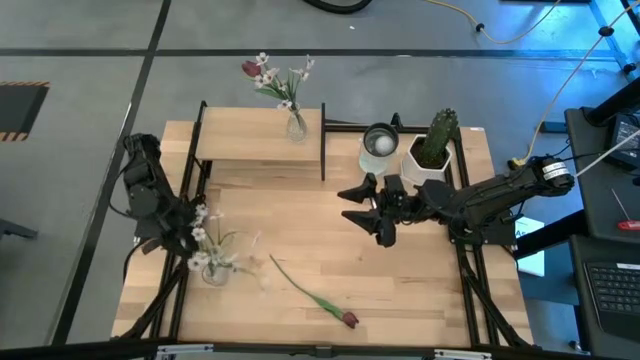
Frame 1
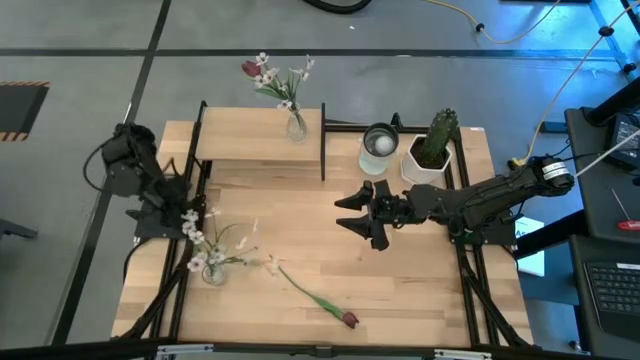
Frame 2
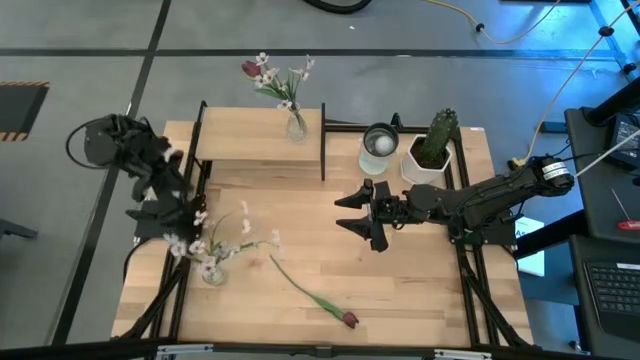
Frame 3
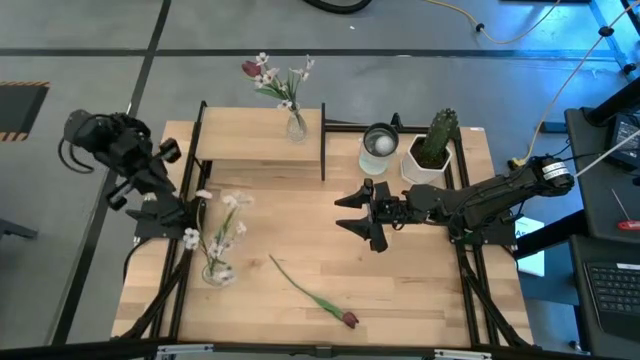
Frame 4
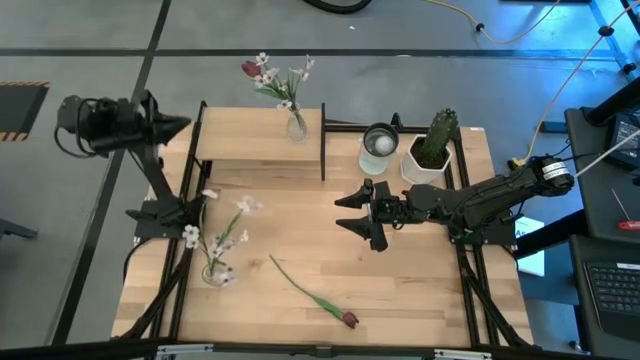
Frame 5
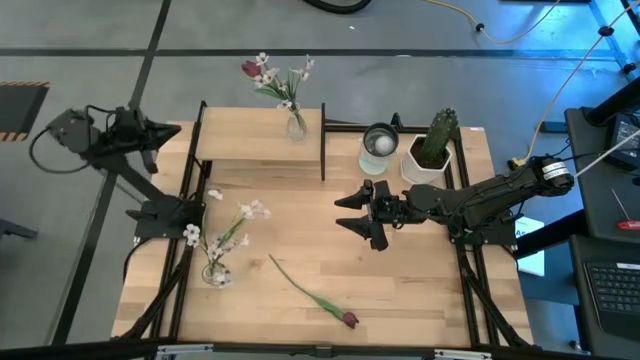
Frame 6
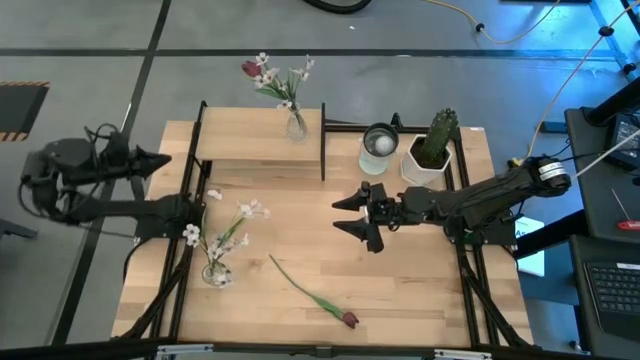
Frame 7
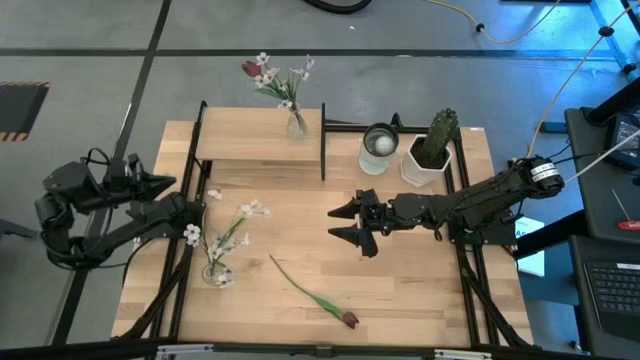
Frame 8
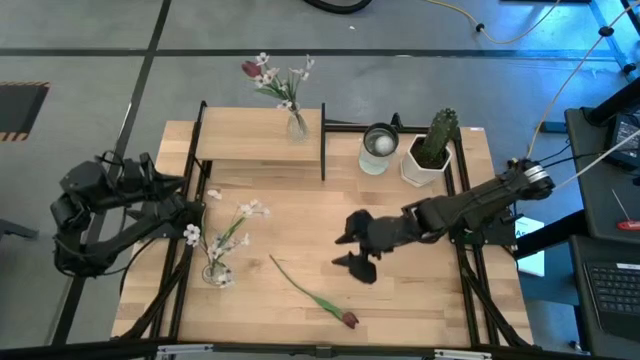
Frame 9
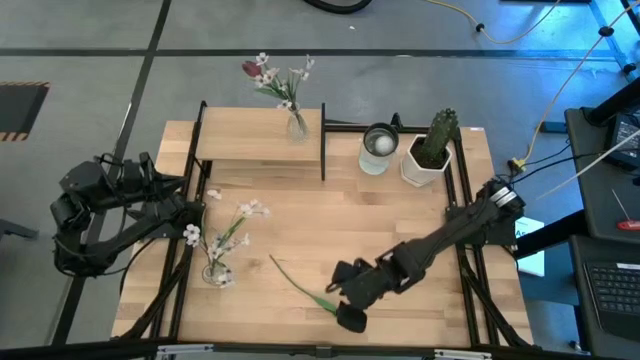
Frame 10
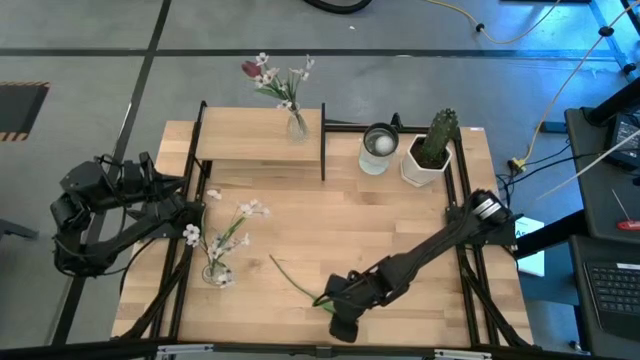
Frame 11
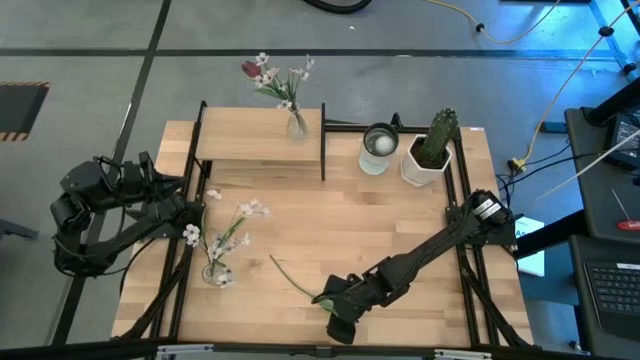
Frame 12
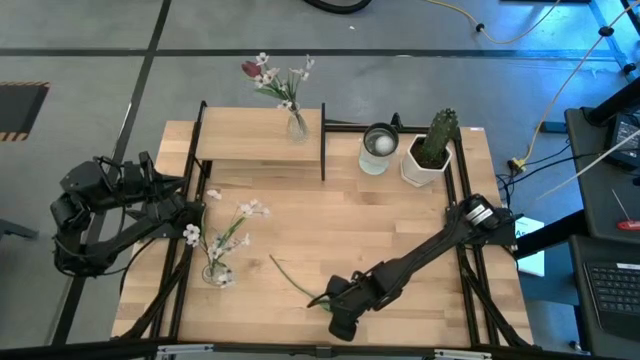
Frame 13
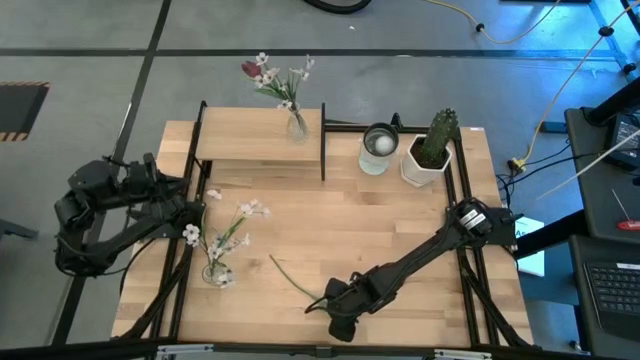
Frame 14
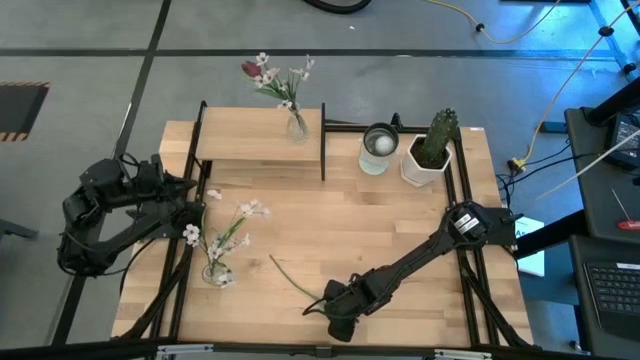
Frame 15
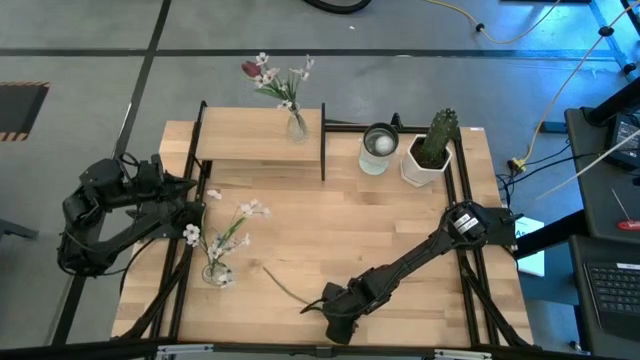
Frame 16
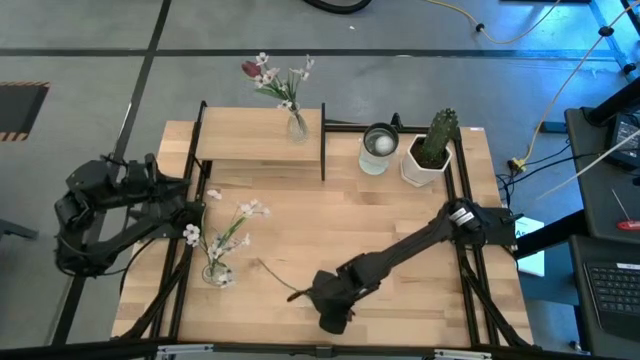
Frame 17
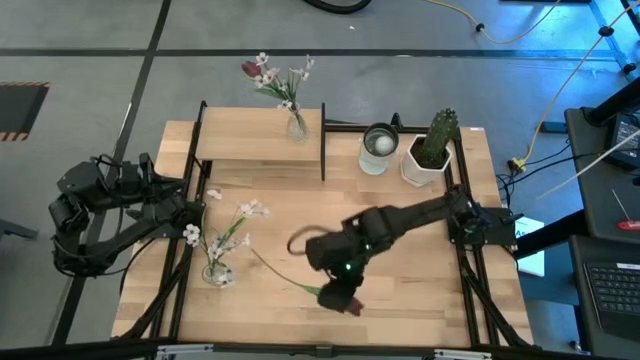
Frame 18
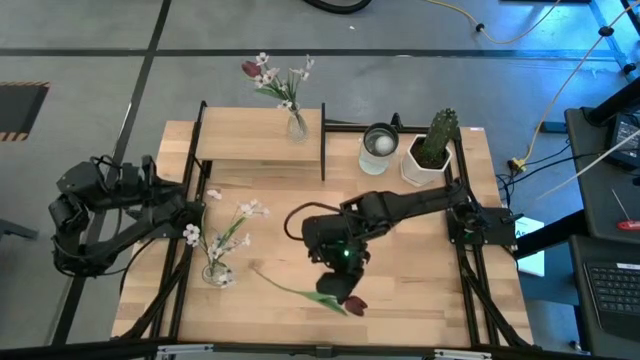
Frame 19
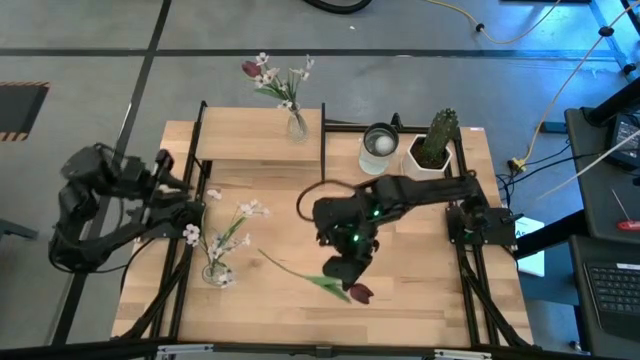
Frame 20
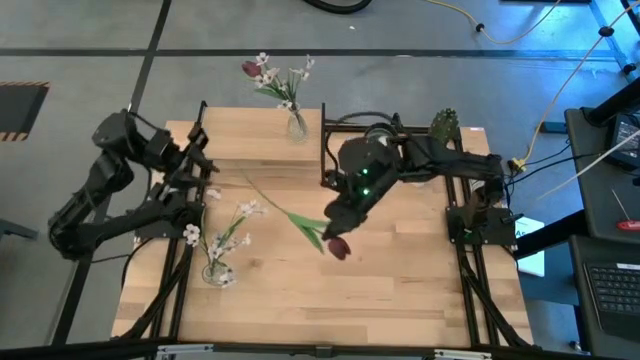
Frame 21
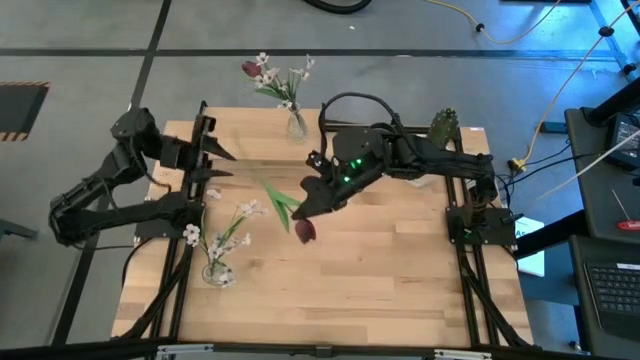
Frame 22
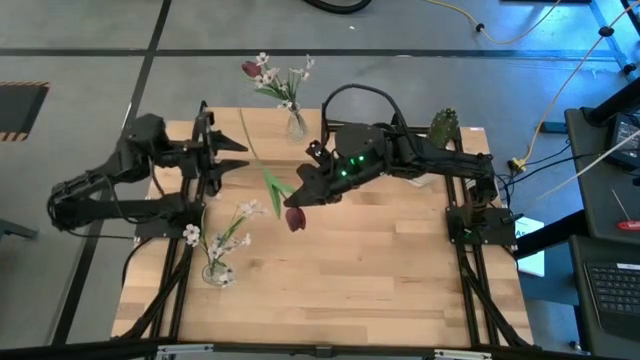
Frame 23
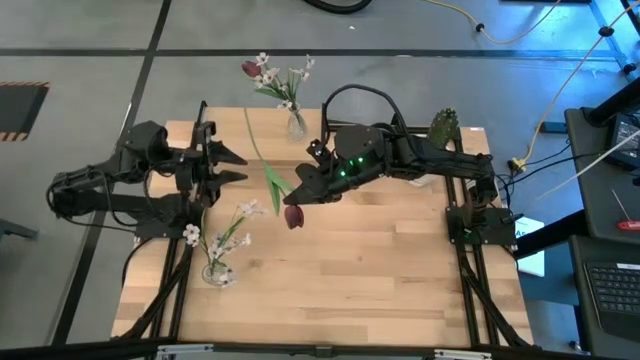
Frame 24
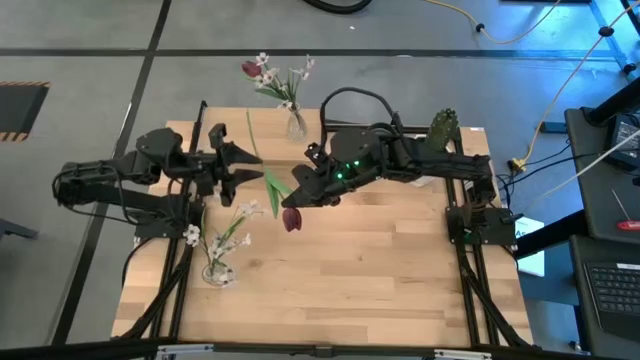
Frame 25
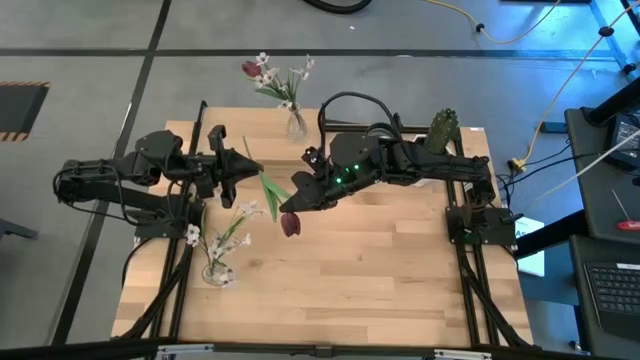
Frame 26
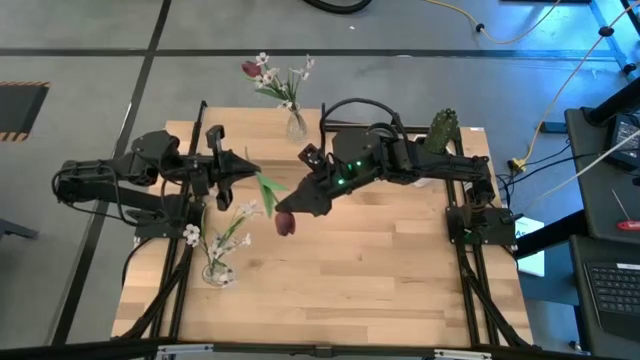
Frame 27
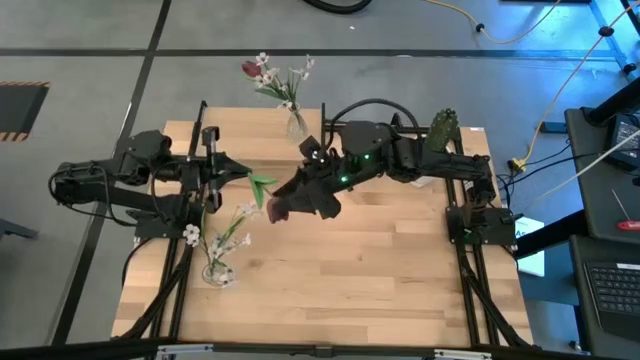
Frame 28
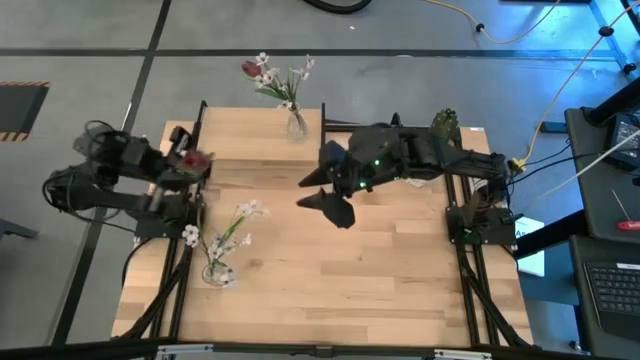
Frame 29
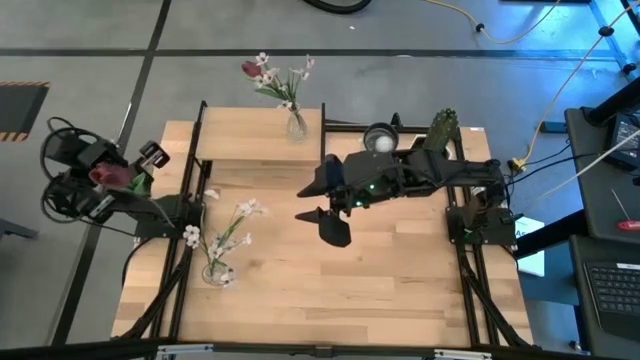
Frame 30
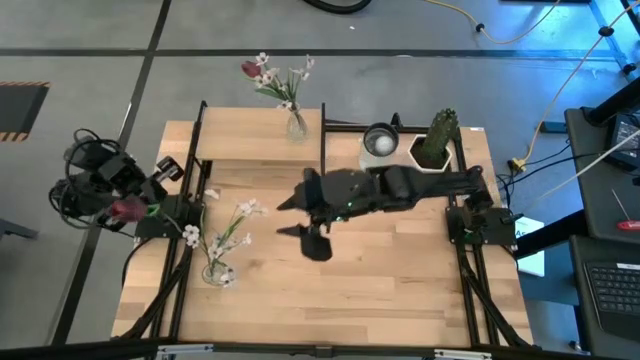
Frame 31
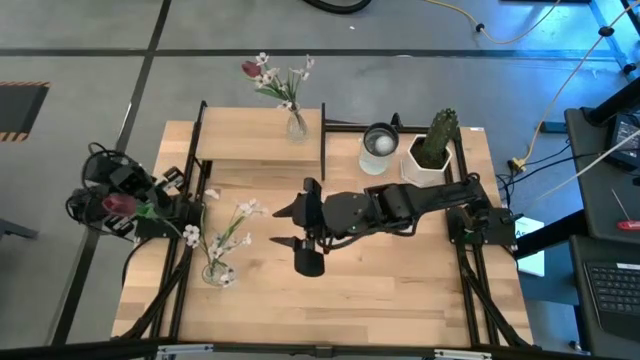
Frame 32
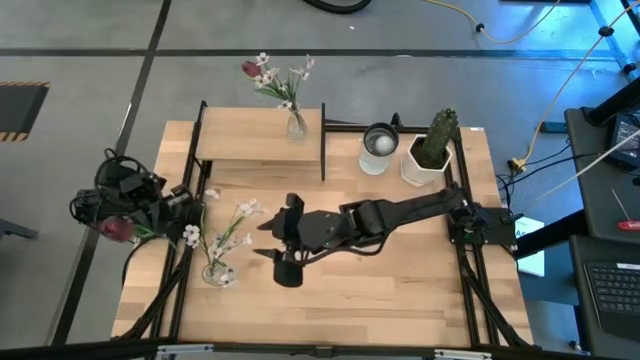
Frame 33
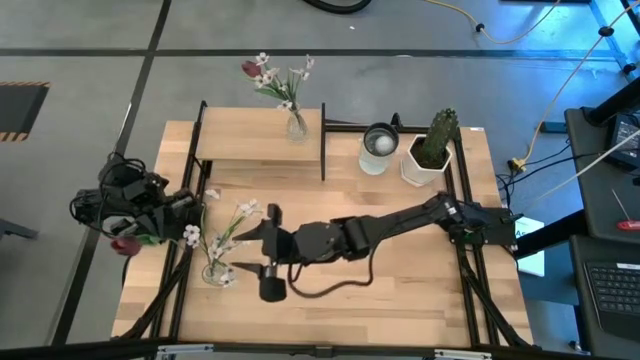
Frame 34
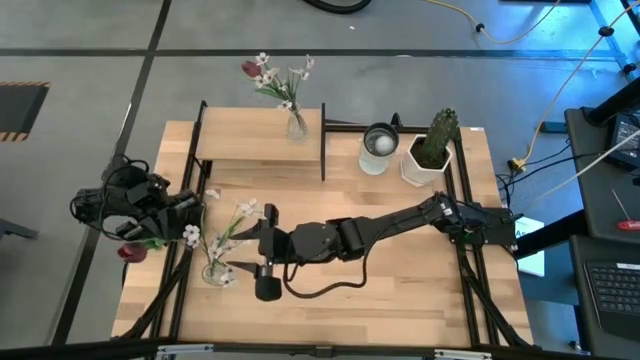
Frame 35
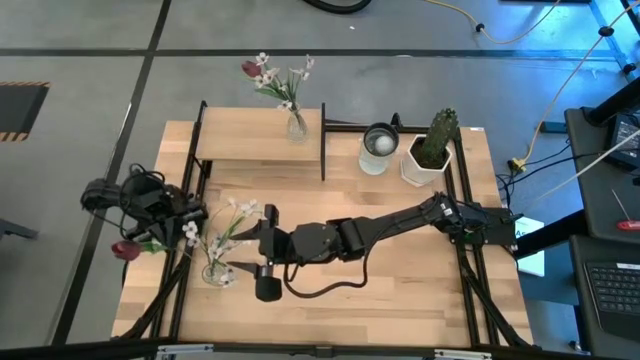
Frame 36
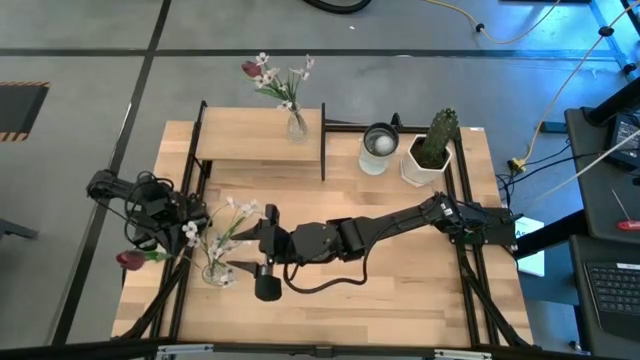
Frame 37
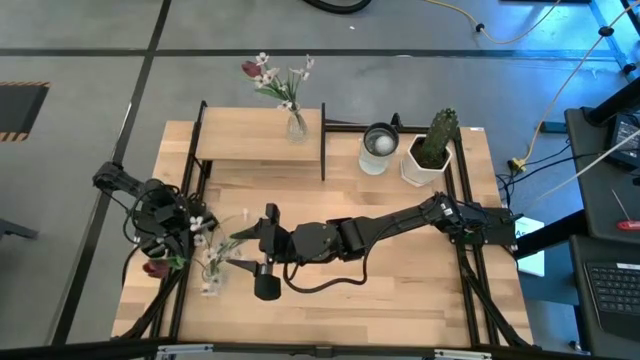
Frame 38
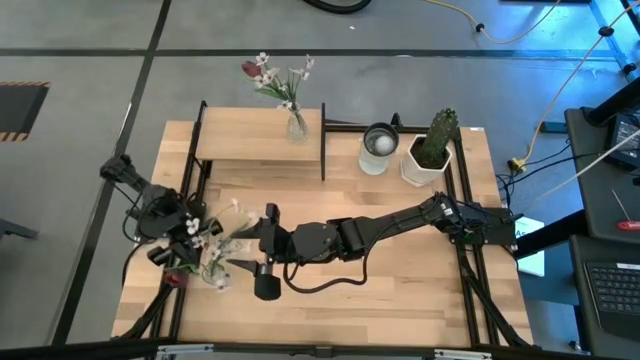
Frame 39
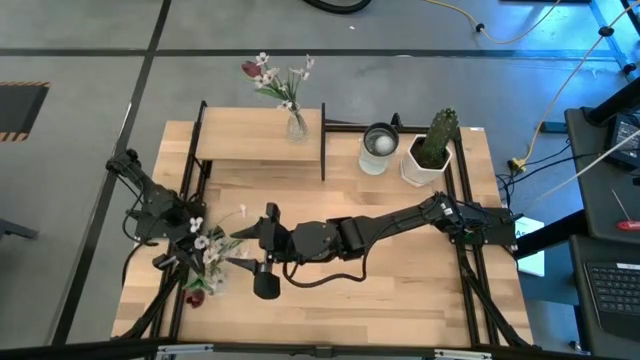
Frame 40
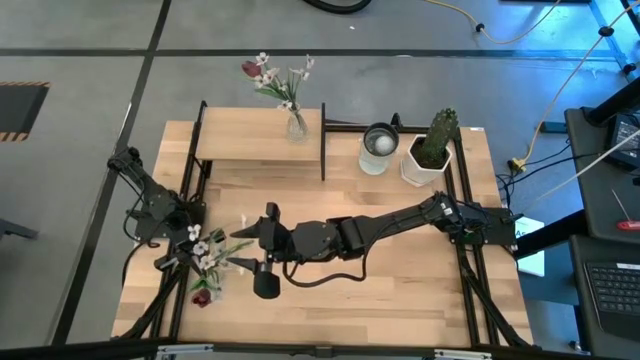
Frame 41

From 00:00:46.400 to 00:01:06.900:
Task: Pick and place flowers into a vace then onto a shelf
Put the red flower into the transparent vase
